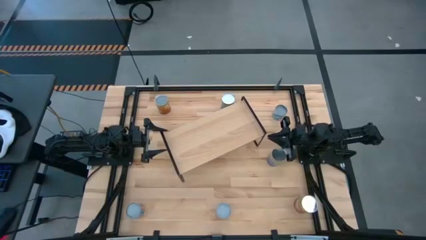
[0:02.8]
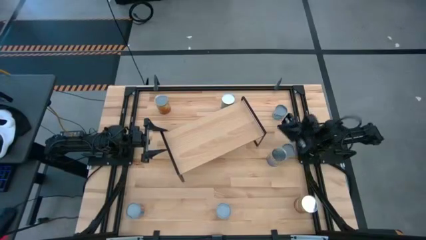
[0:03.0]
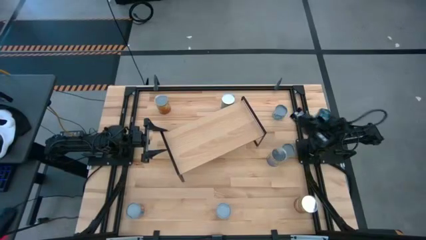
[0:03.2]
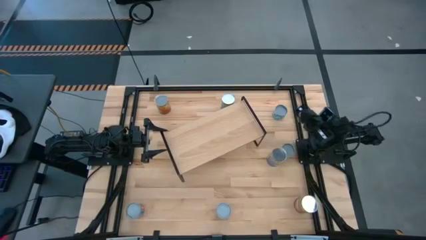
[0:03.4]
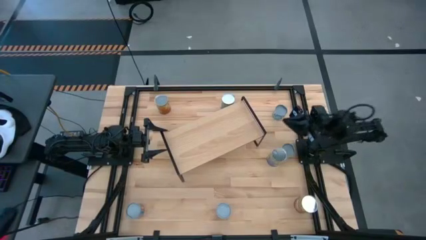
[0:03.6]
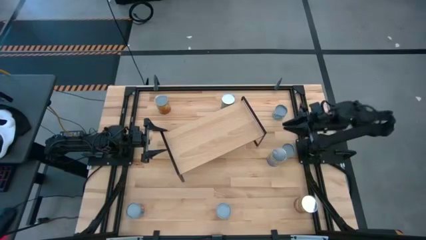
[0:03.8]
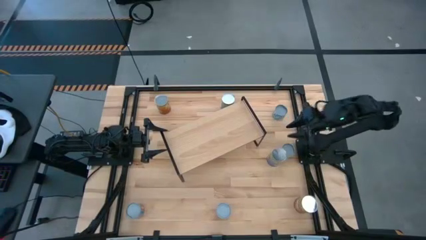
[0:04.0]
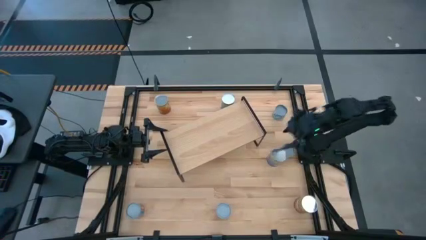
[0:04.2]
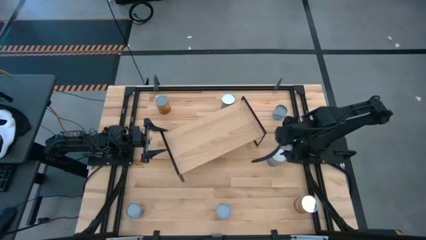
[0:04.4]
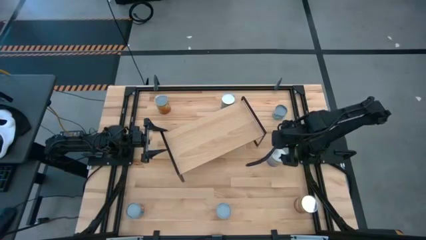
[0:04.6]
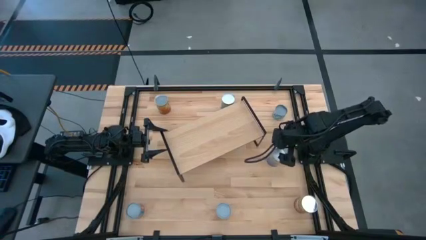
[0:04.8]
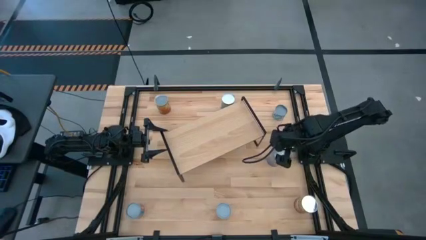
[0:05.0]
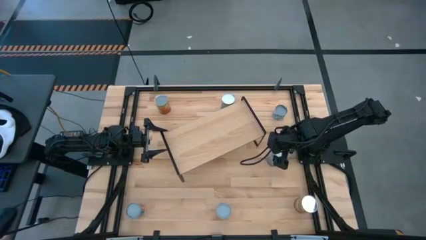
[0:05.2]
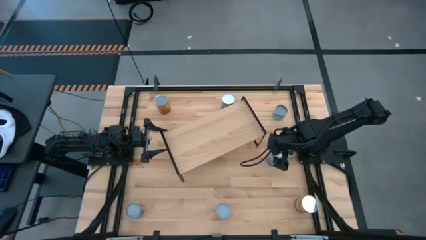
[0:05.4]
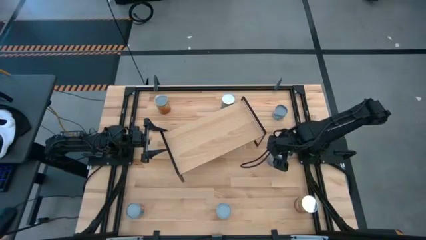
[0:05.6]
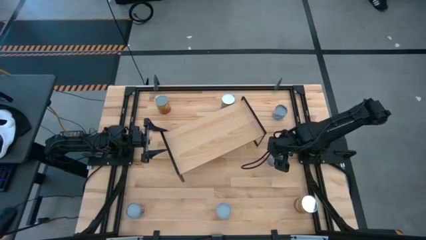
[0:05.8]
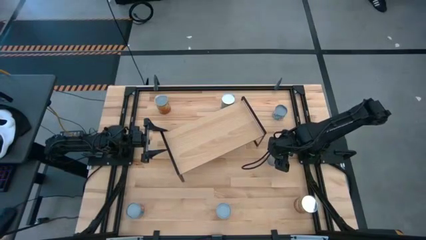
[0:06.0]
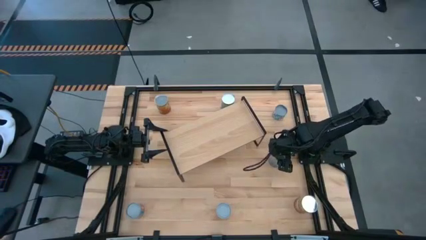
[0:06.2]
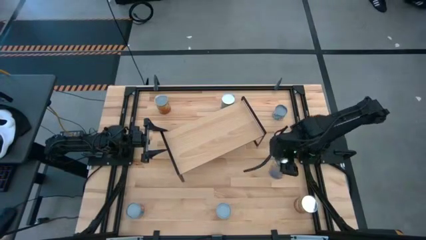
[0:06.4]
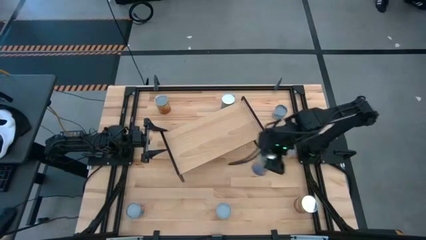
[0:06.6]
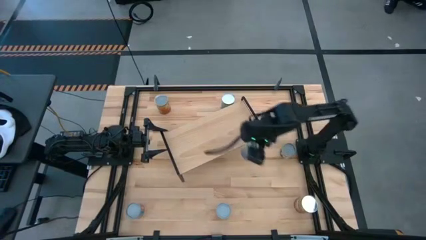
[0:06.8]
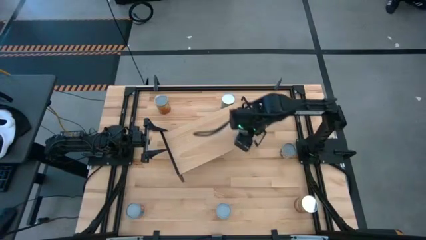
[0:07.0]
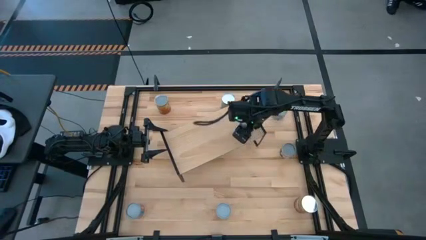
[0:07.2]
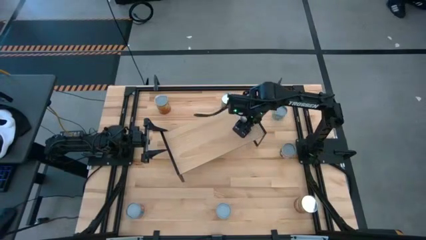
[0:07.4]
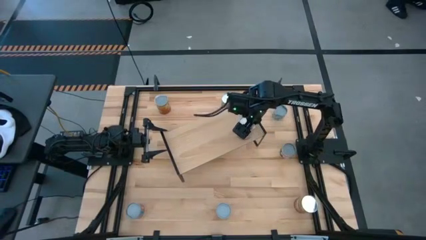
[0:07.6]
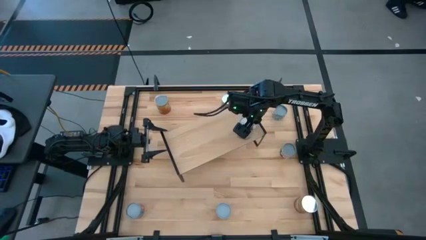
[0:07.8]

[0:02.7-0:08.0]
Task: Pick and place cans onto a shelf
Put the bottom large canned peaches on the shelf

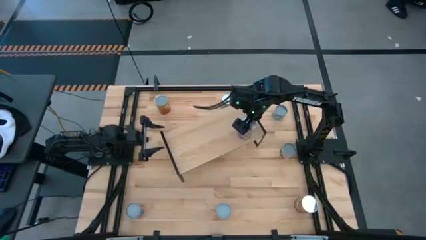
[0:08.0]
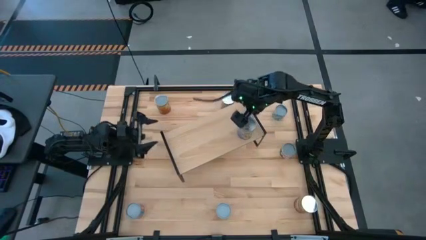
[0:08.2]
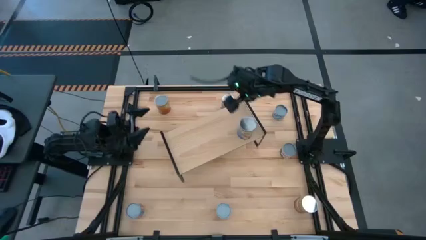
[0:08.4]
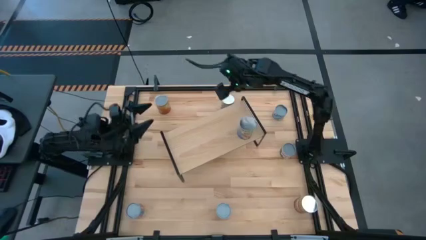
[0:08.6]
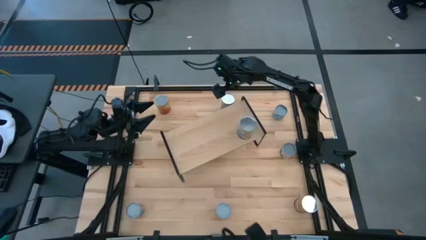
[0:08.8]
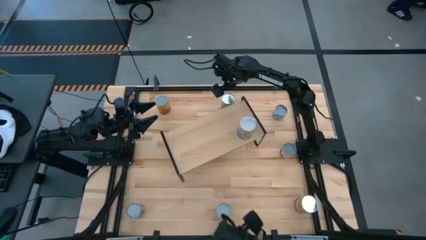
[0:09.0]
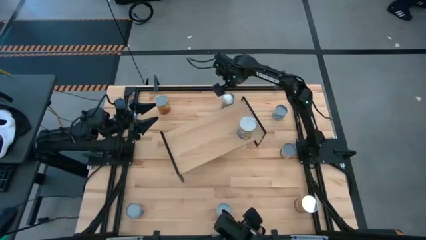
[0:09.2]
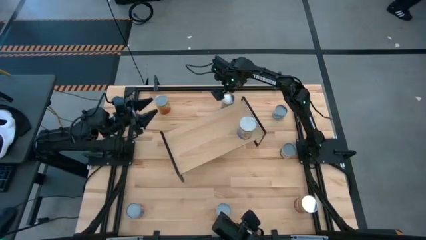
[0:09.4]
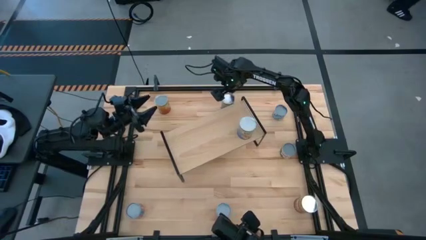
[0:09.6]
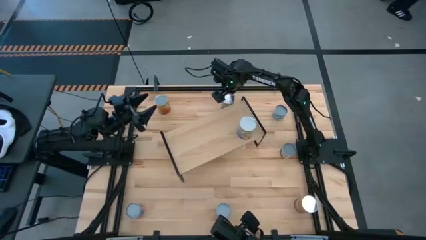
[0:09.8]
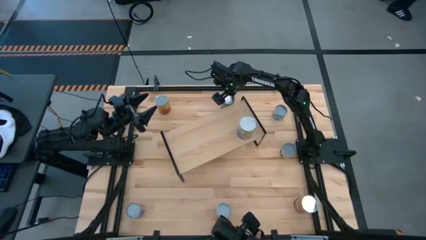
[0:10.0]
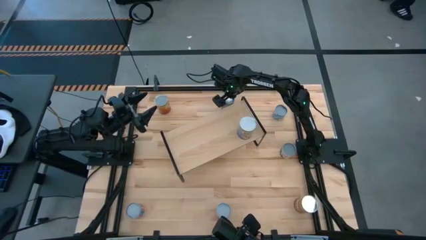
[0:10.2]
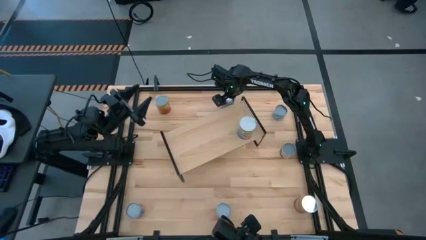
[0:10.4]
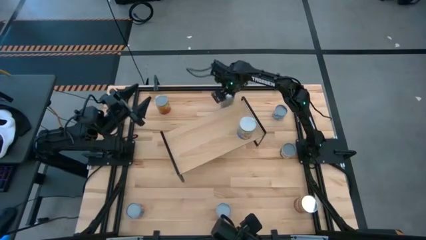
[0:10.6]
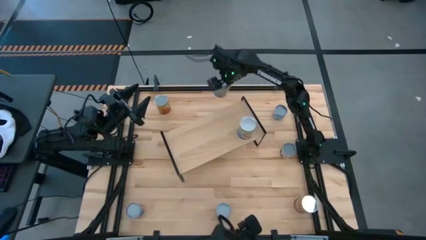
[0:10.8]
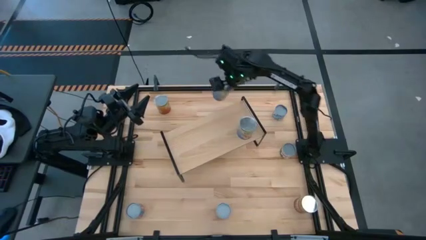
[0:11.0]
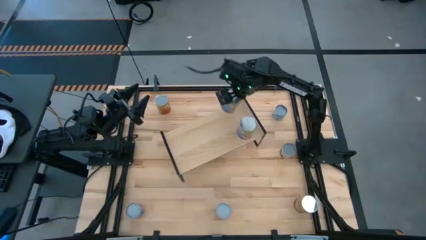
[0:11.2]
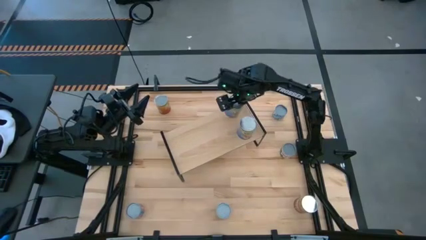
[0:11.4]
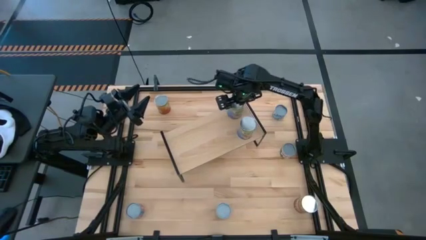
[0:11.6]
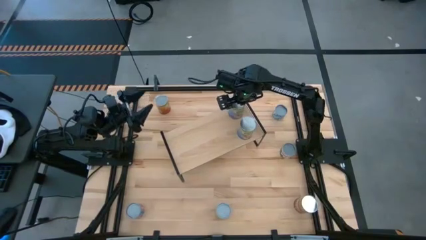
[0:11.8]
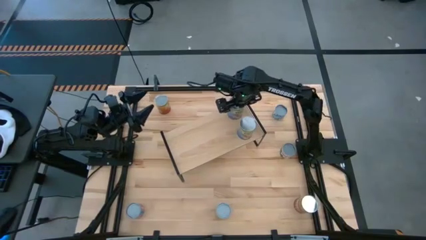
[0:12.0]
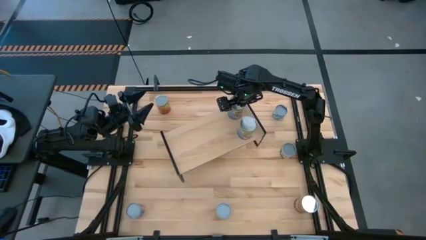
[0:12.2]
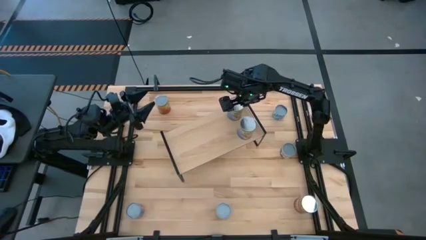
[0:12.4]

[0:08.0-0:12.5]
Put the large canned peaches on the shelf

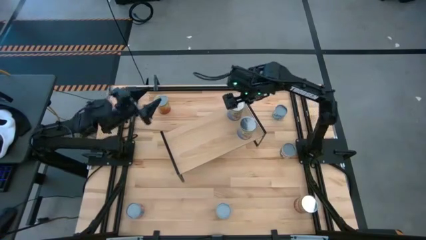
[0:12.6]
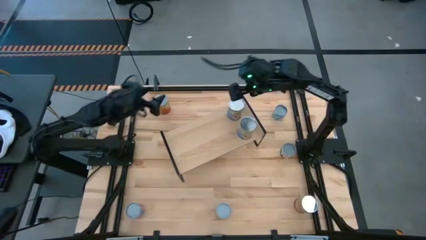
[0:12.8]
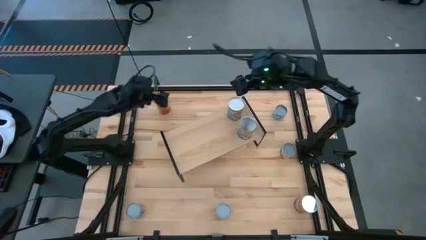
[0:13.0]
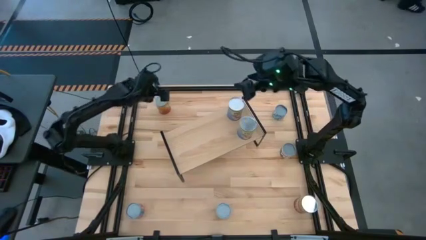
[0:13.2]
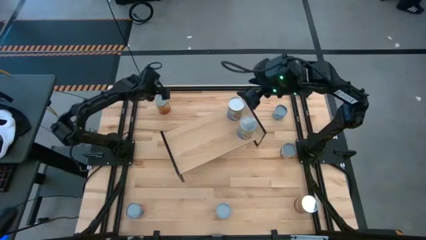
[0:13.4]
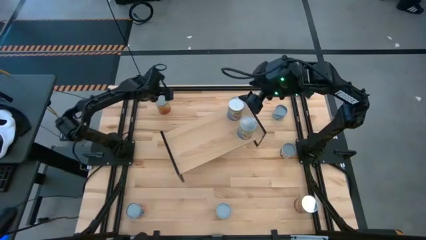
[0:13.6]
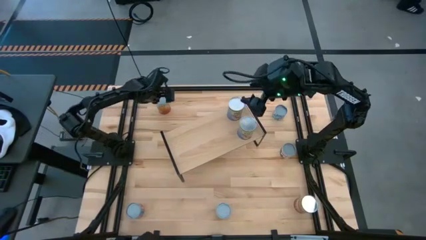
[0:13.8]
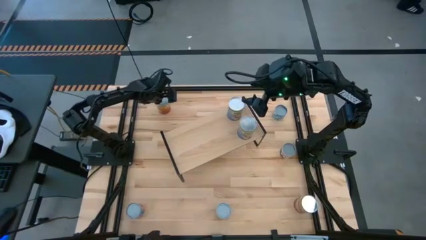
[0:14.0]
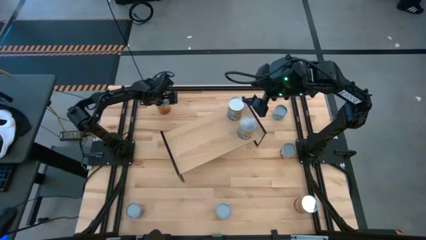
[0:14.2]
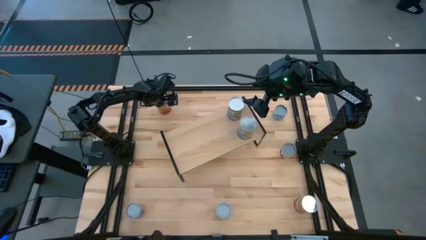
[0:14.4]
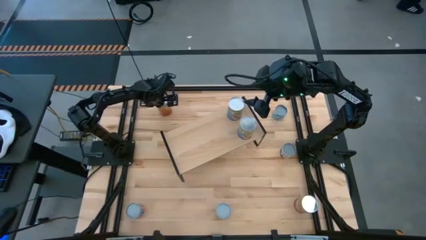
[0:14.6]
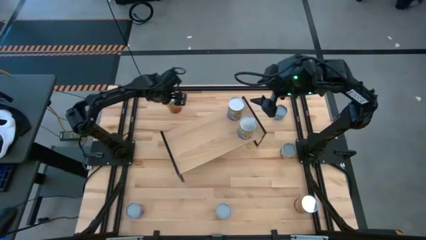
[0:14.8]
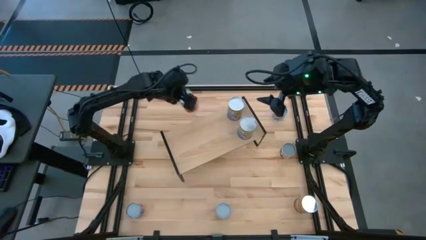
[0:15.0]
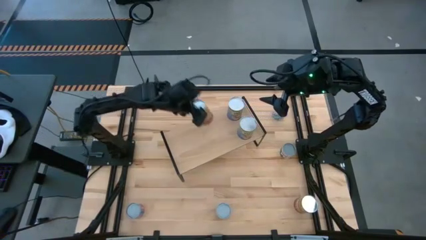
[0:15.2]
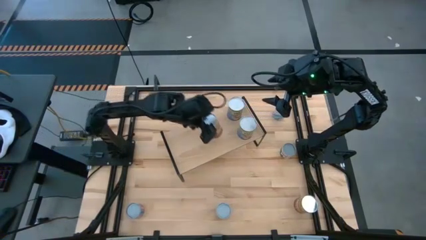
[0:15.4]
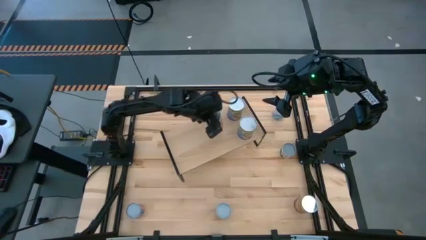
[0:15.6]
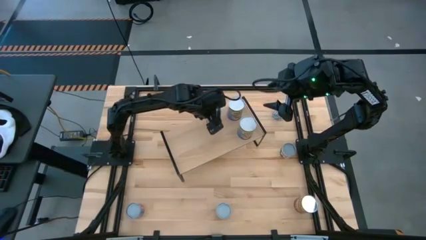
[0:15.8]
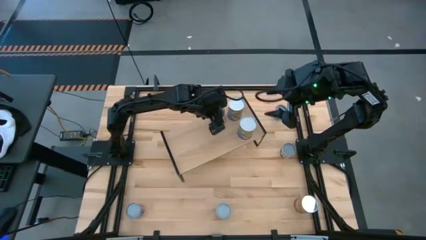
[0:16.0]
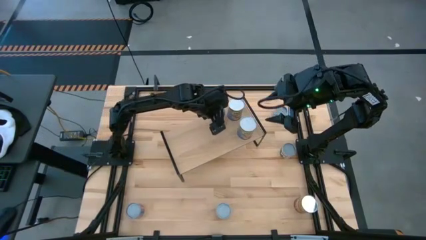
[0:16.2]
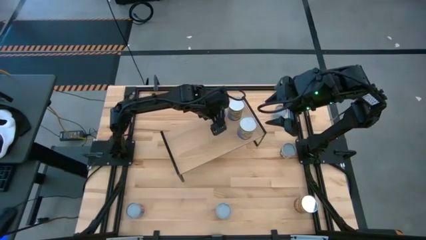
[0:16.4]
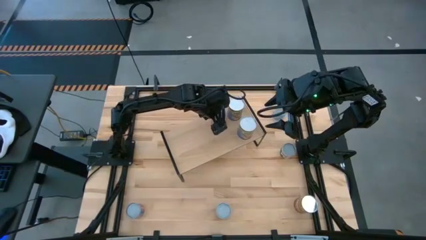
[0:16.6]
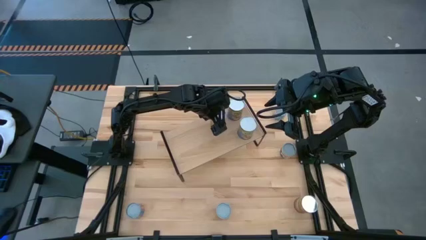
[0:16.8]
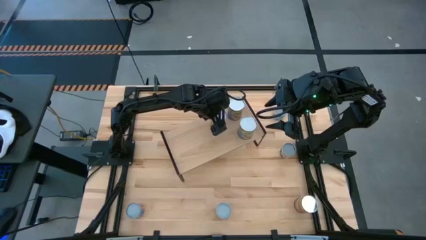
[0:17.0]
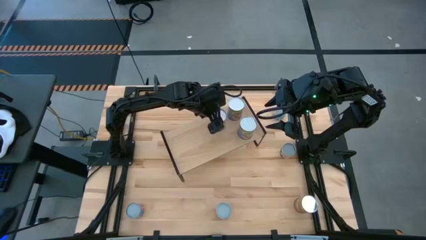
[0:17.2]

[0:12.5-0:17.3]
Put the top large canned corn on the shelf

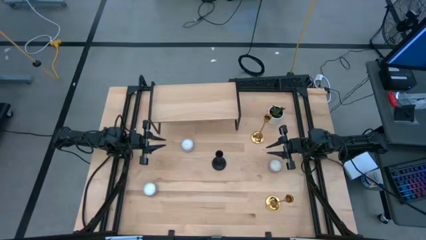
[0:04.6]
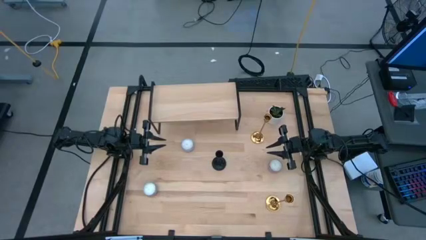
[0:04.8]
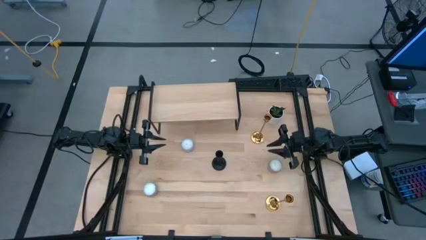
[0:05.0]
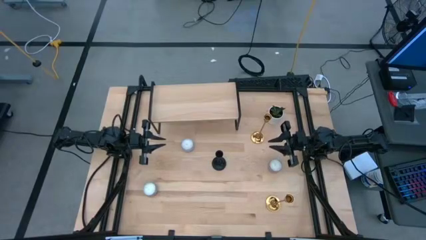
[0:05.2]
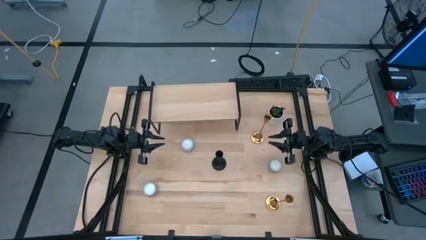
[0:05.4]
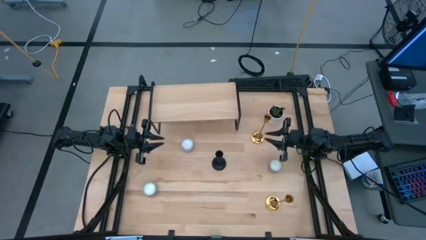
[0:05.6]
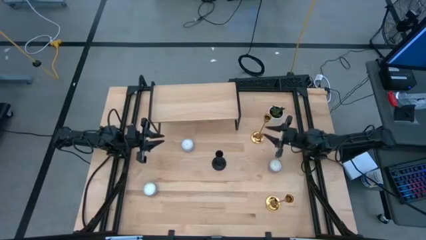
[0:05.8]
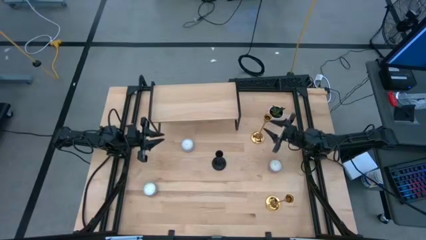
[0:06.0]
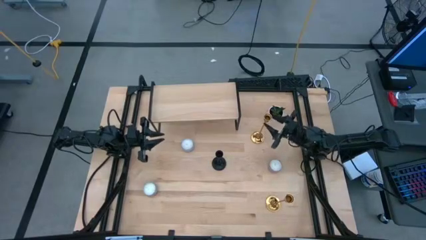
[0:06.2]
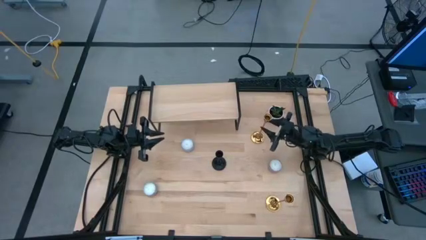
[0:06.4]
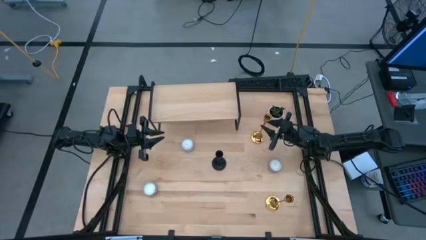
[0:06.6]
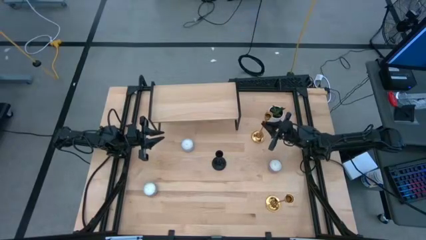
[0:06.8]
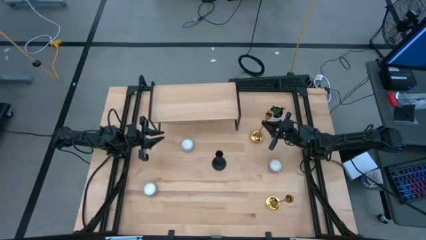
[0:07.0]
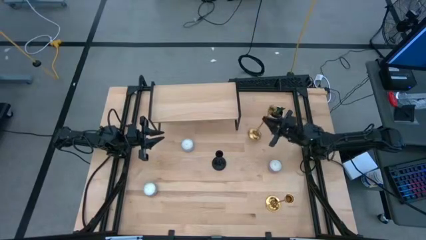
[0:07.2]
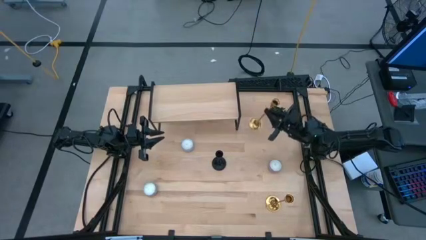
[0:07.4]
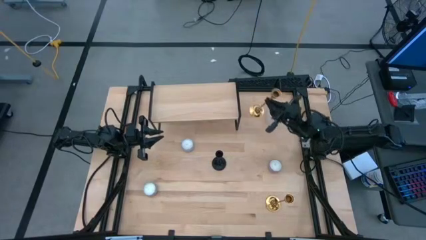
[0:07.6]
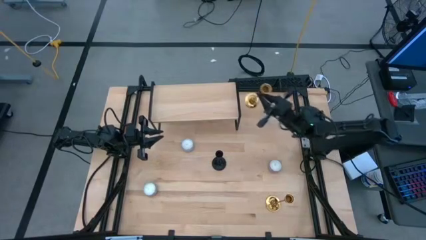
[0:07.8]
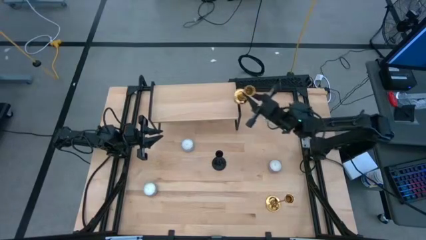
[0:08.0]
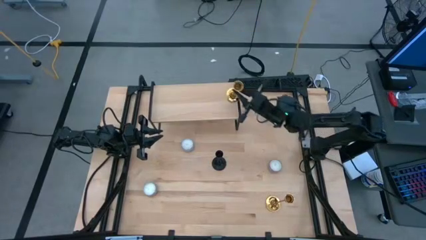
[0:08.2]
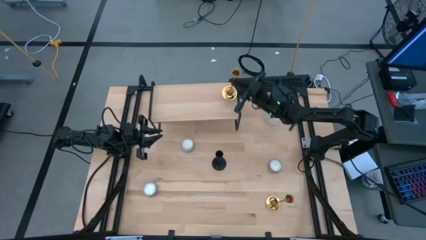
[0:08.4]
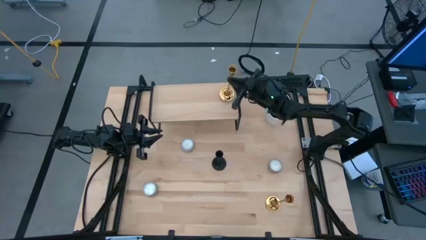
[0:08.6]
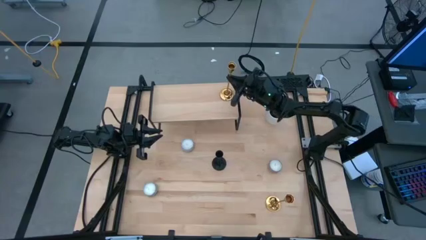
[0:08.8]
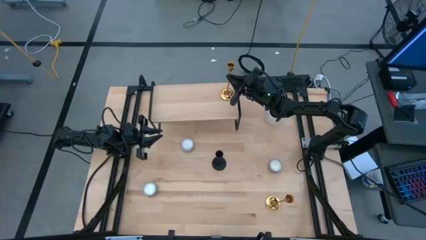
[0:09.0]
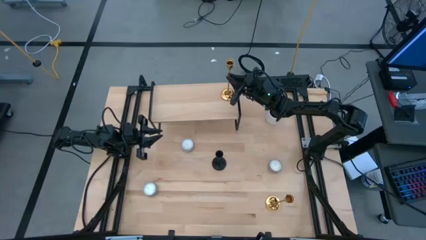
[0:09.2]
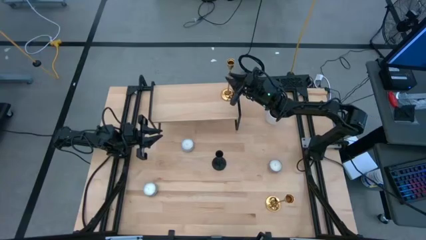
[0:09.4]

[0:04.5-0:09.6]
Task: Pick & Place candle stick holders
Put the top gold candle holder on the shelf
